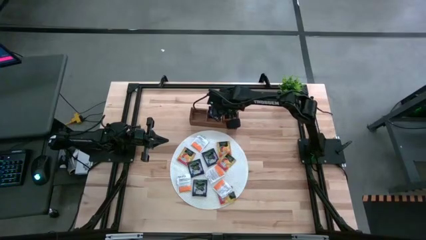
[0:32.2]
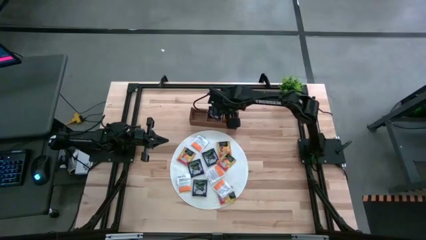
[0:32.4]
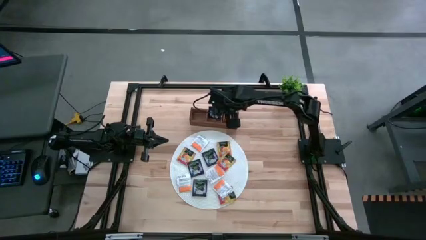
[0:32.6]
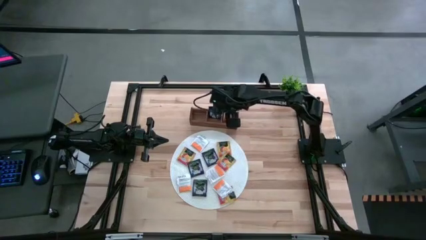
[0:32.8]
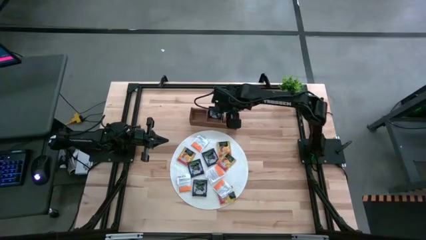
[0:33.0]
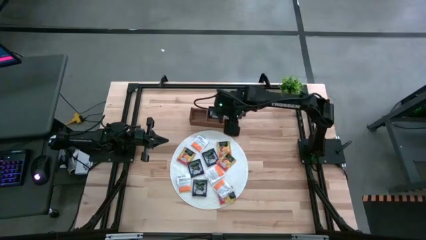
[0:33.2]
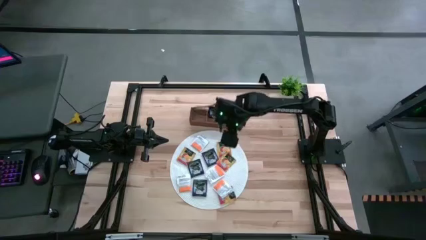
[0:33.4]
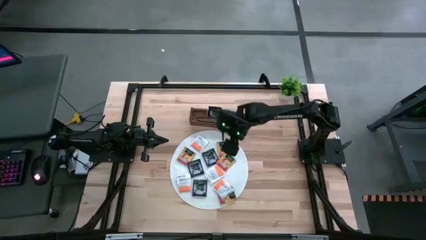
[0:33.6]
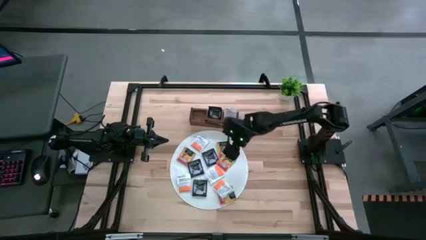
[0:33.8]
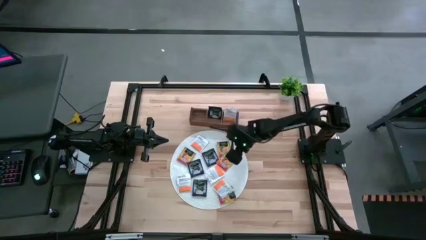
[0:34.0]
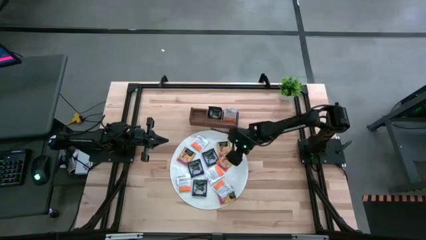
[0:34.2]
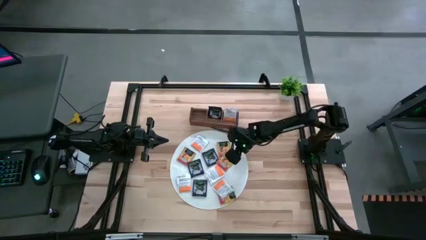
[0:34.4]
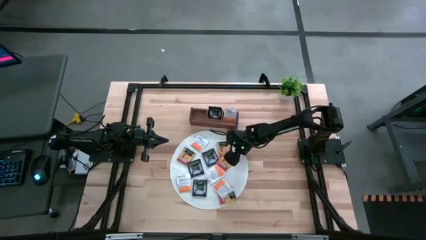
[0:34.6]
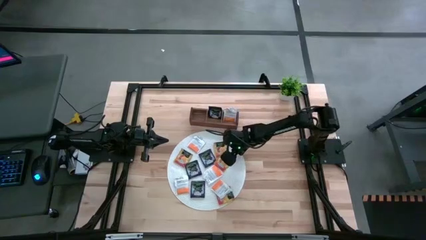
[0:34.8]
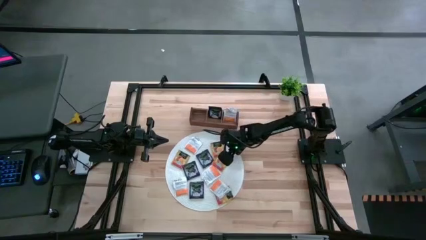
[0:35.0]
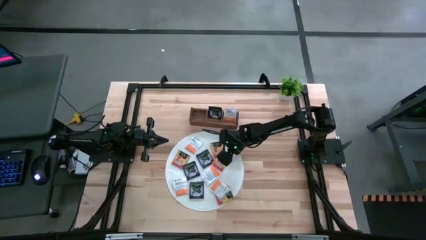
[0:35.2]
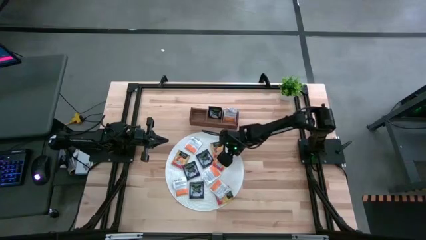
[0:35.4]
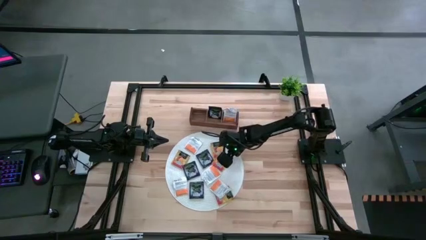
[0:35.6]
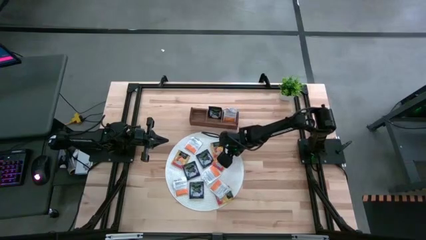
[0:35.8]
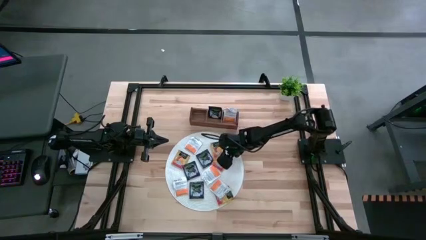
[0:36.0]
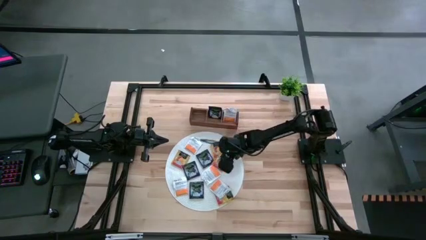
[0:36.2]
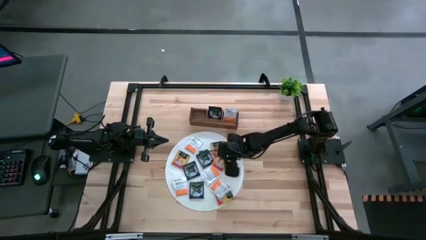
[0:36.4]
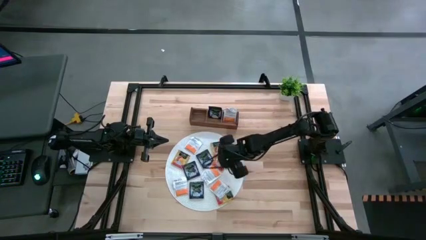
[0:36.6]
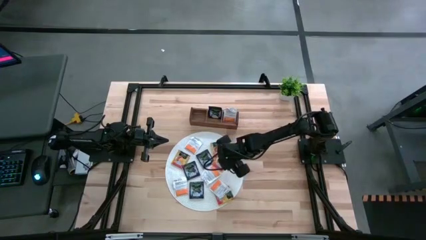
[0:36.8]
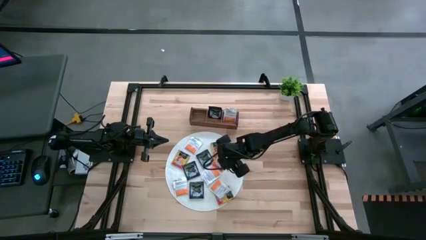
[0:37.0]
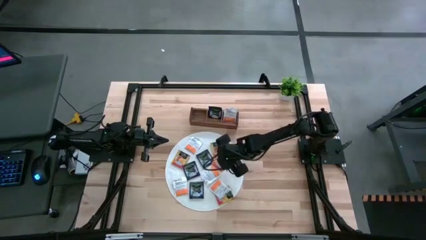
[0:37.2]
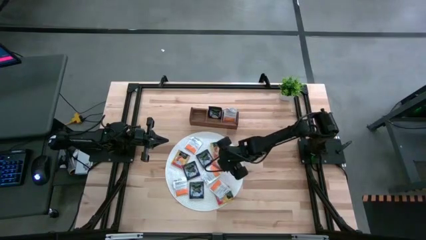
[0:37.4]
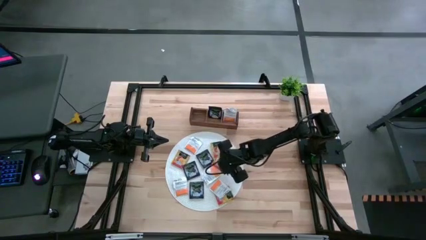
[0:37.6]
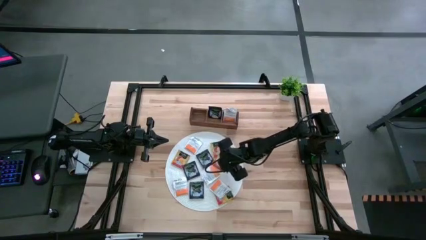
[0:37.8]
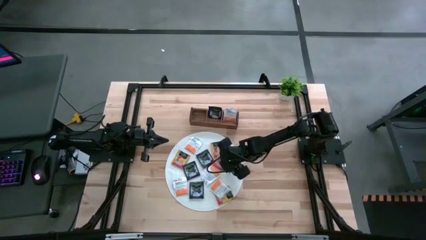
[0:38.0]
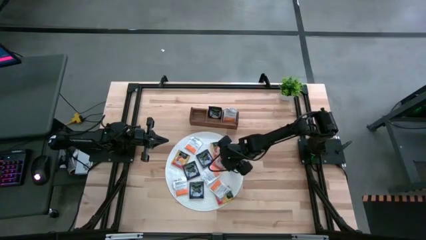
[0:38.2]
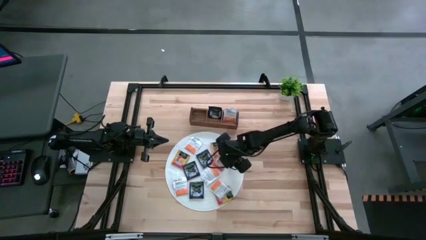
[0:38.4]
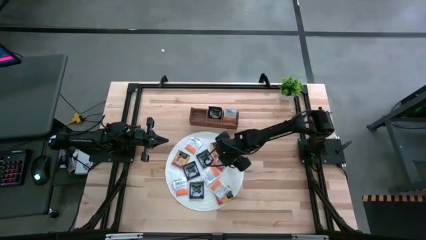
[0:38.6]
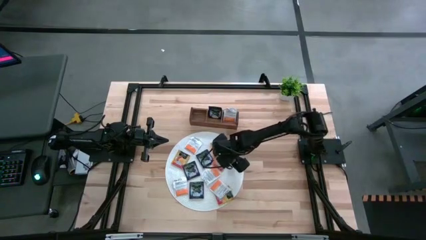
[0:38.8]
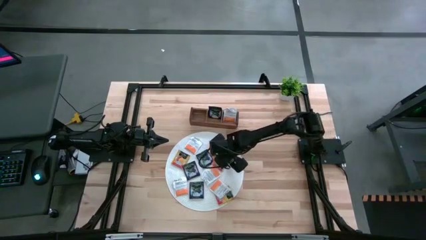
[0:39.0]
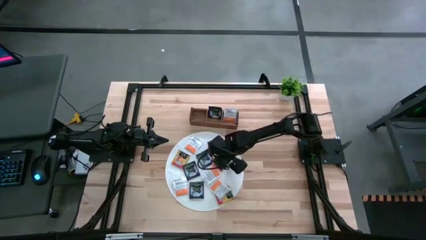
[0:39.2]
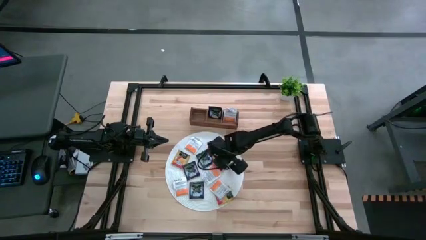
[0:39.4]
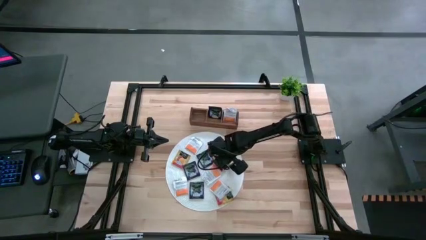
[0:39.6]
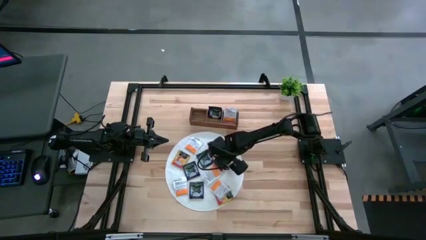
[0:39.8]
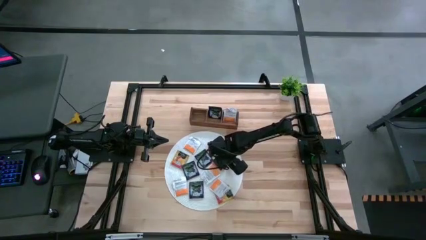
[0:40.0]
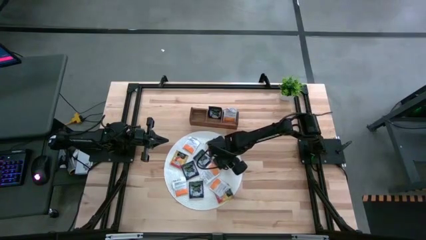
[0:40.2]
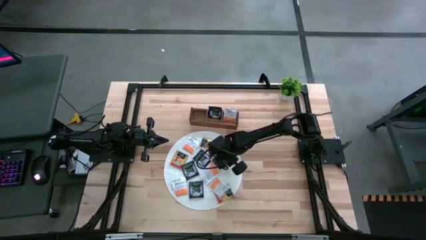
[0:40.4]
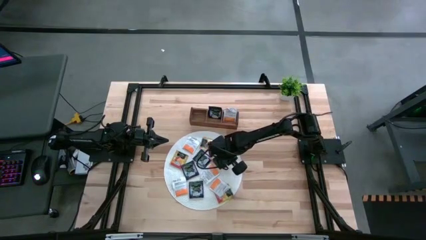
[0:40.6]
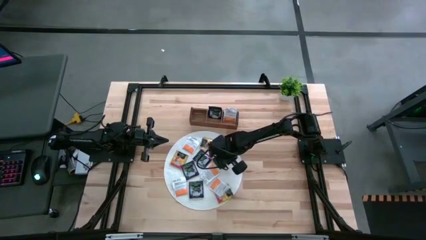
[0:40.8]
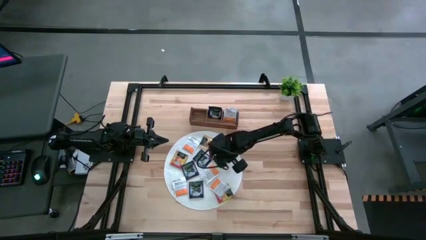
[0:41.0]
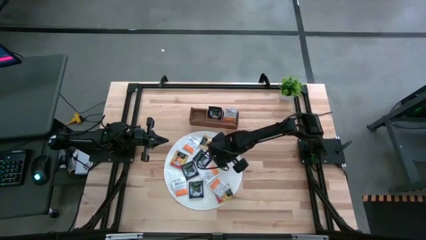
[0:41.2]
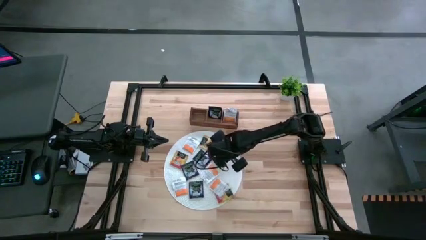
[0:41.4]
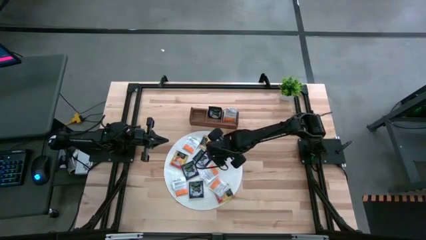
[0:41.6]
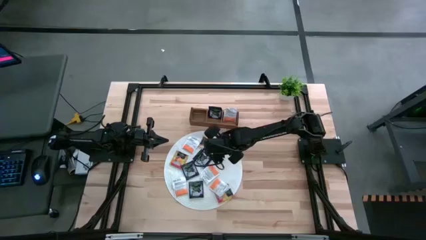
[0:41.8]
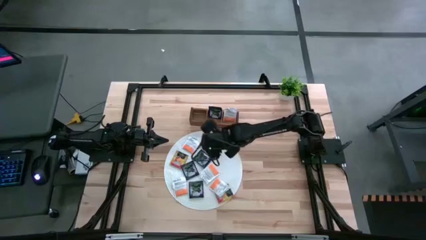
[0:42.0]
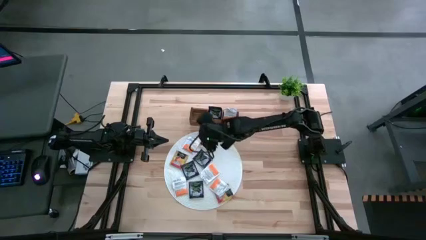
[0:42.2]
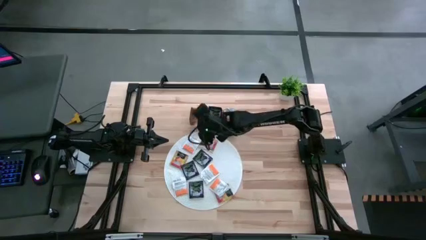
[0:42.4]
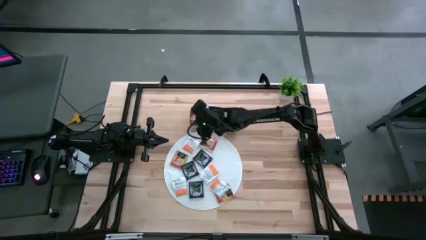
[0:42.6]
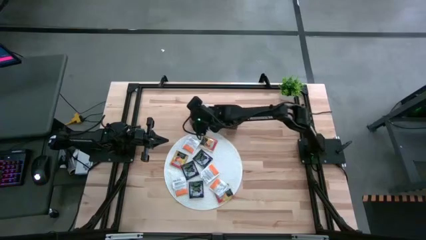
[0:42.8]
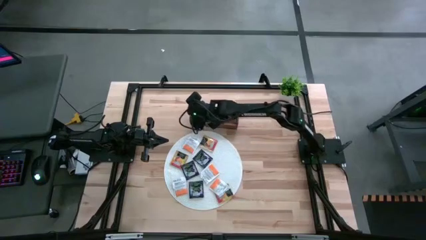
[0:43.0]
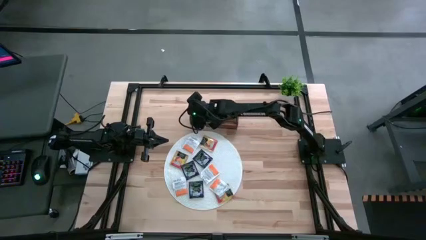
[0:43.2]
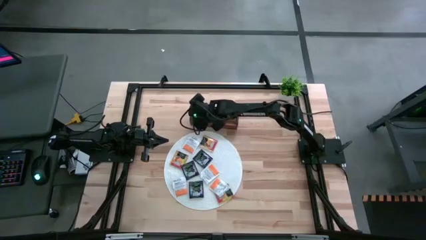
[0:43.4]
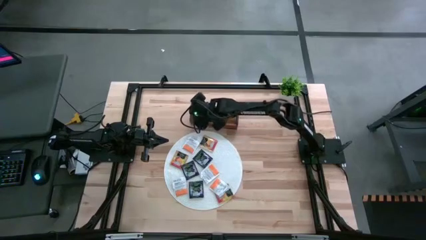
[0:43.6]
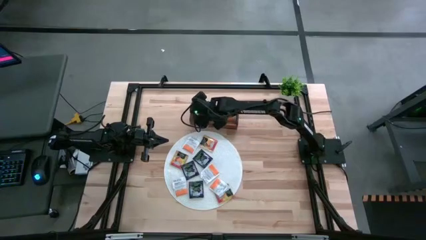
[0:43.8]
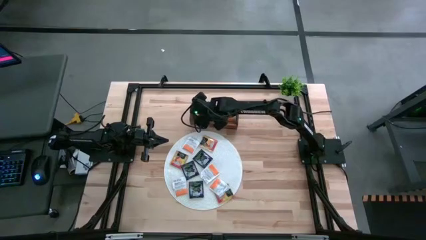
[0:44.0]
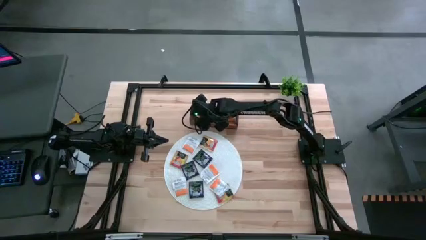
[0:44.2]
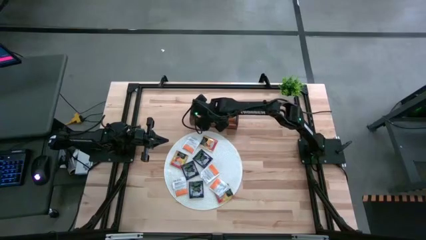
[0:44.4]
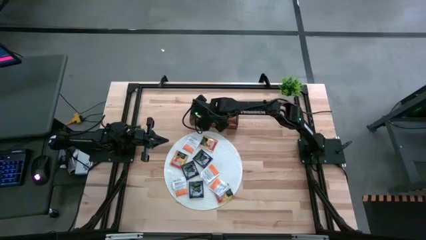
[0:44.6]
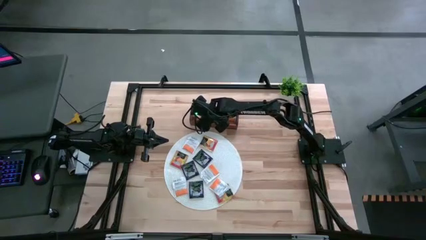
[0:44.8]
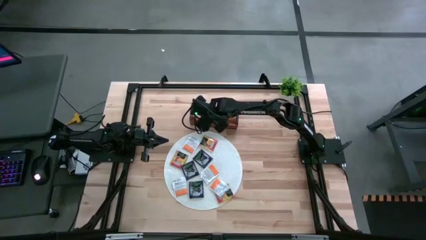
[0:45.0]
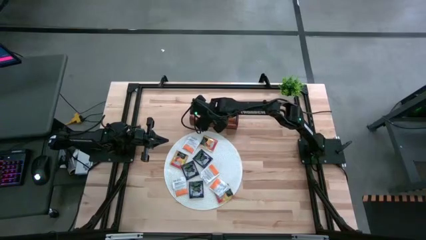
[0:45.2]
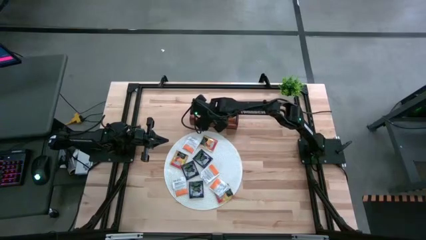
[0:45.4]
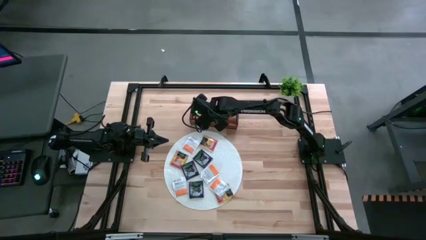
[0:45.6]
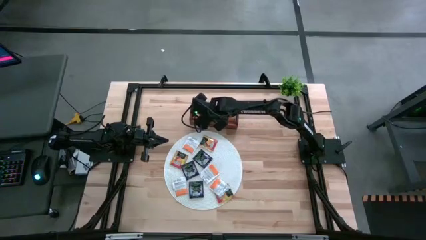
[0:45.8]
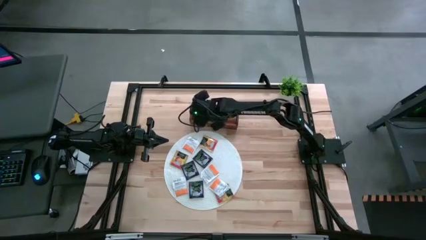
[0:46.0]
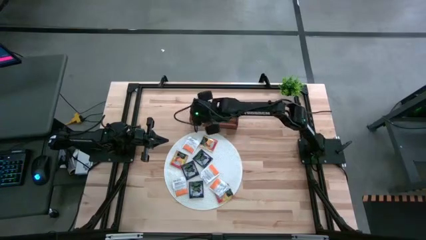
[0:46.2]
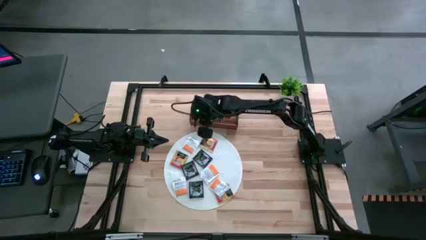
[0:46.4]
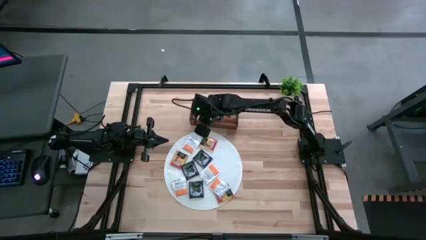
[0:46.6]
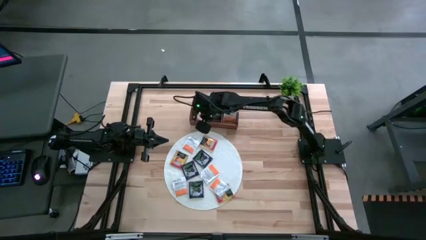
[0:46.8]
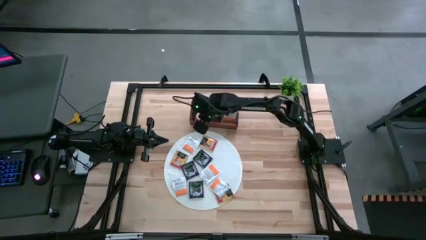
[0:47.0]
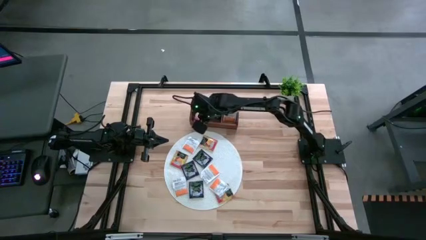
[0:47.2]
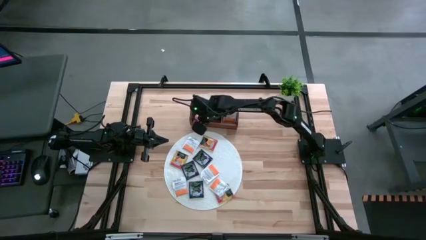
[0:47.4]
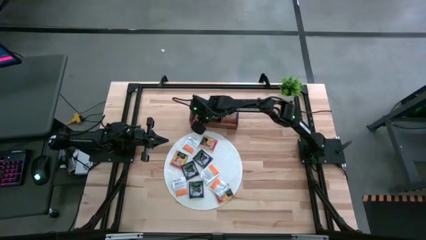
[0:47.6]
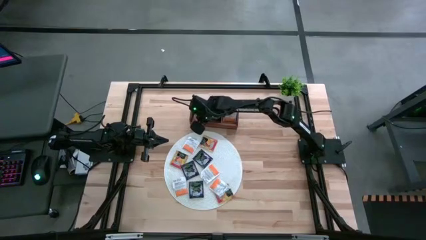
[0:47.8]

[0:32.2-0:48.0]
Task: Pick & Place Tea
Put the yellow tea bag into the left section of the wooden organizer
